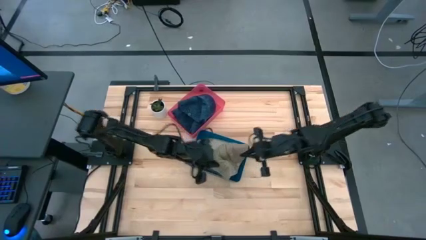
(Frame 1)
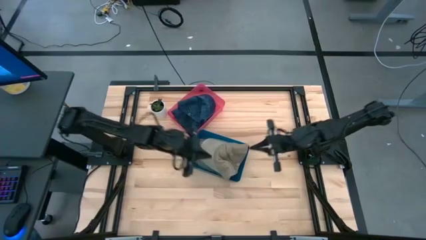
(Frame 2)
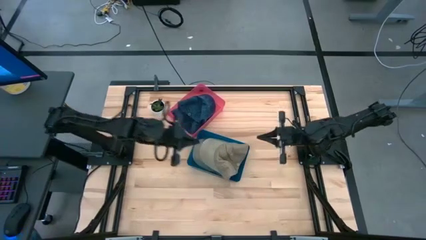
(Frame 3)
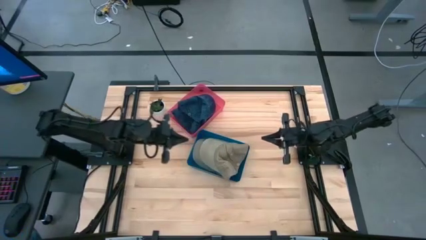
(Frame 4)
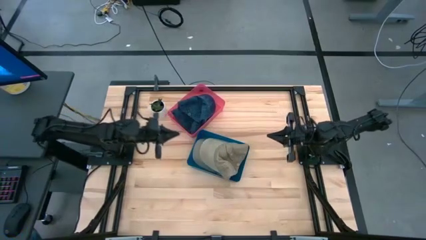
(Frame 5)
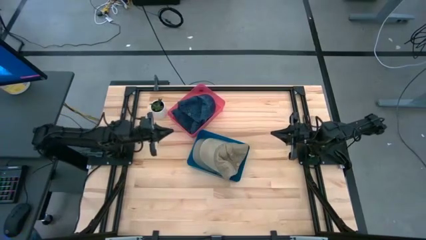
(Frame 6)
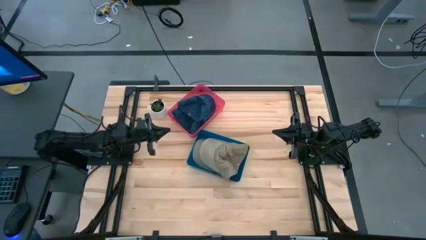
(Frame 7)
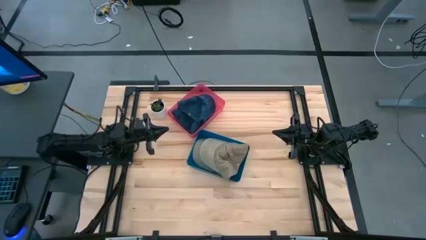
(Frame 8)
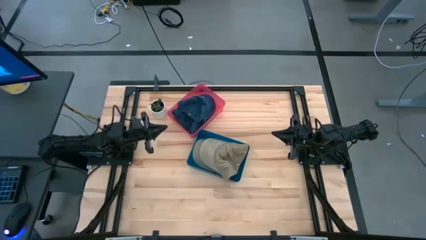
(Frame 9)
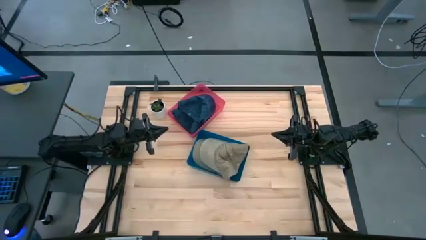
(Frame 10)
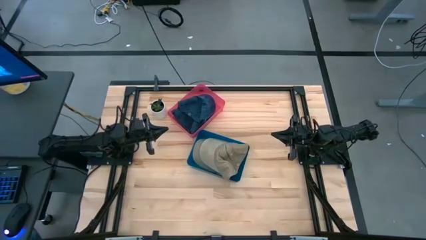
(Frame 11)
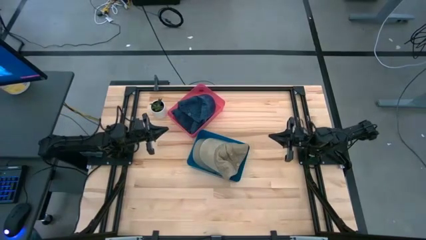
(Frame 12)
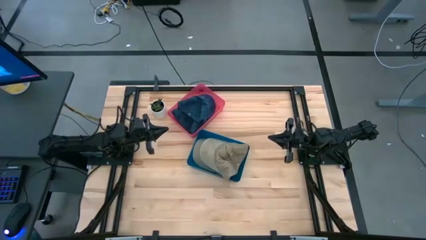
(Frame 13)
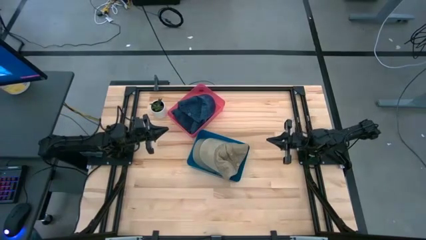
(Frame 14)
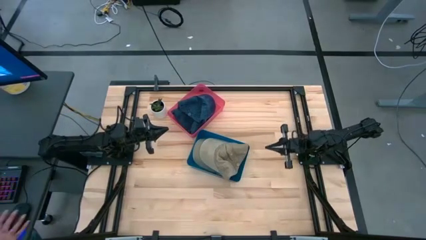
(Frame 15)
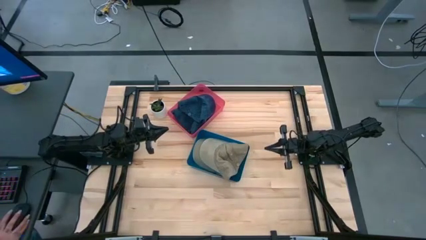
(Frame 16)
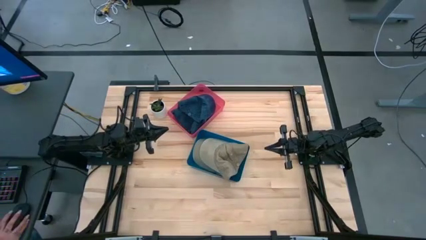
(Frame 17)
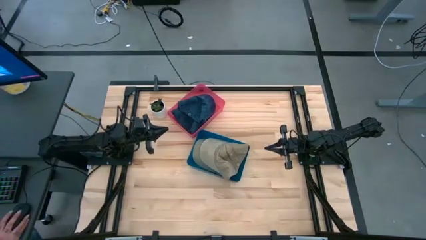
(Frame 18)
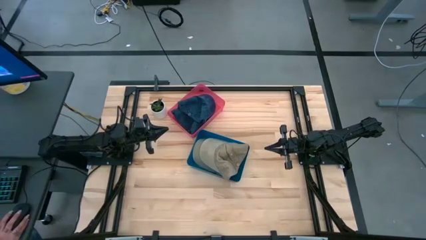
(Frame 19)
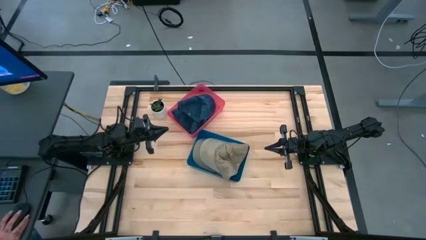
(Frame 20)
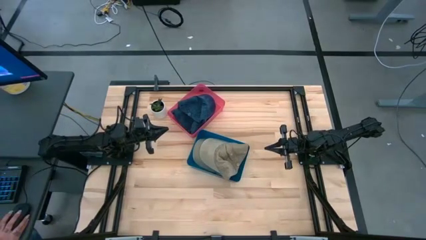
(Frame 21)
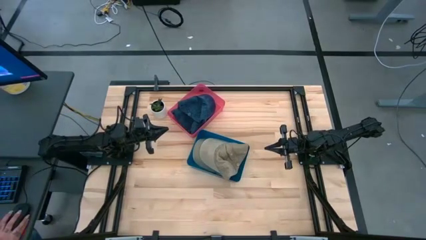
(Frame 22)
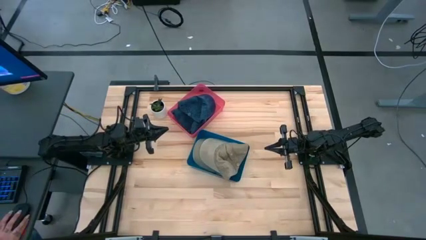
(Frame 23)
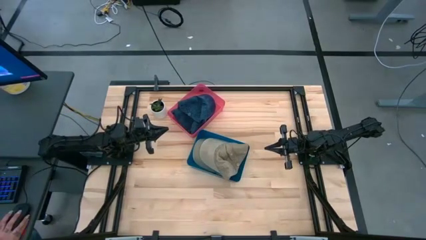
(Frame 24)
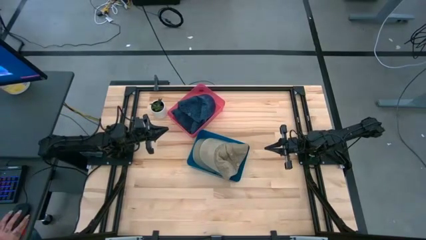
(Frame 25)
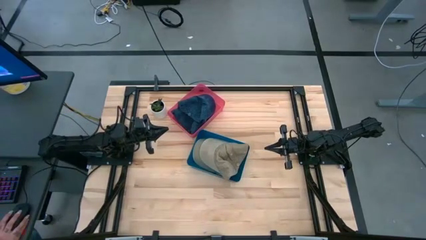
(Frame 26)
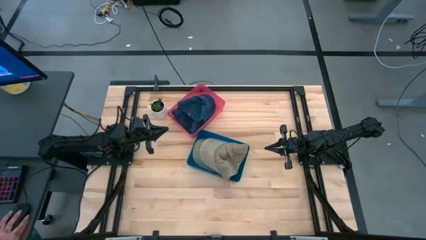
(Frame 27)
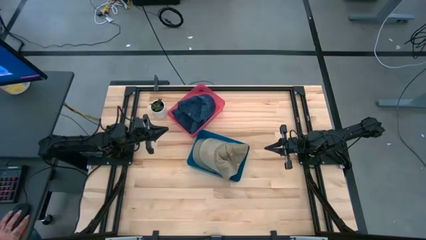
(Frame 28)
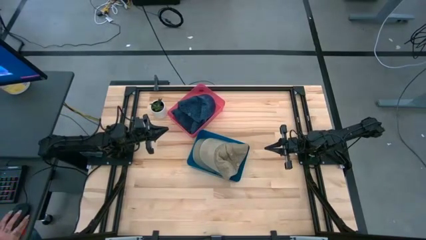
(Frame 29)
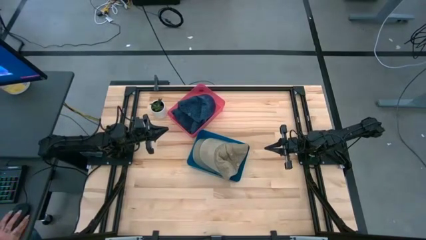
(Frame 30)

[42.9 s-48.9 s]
Task: Pick & Place hat
Return to Home Position

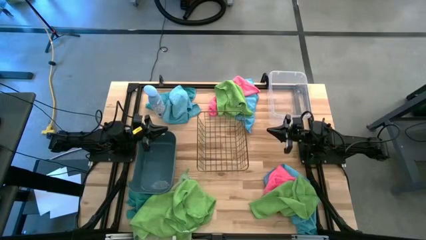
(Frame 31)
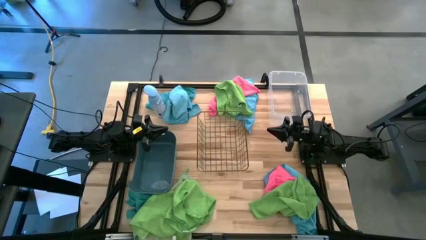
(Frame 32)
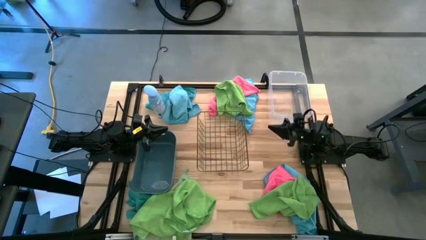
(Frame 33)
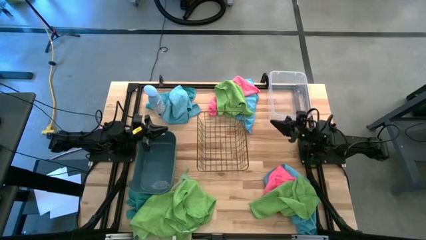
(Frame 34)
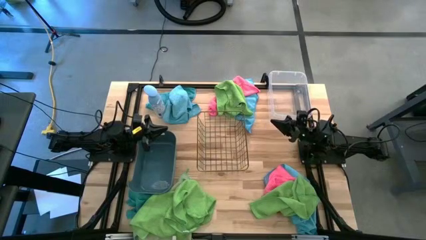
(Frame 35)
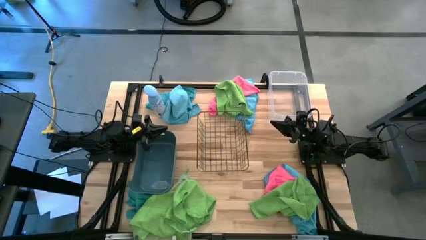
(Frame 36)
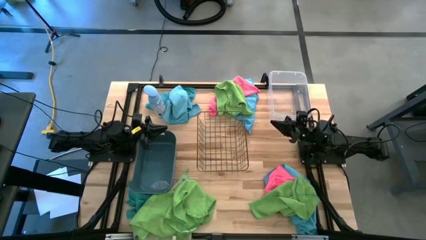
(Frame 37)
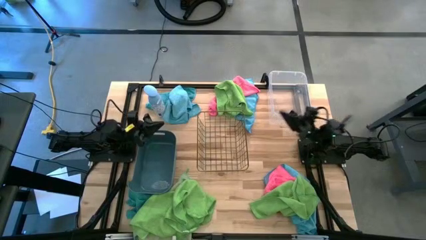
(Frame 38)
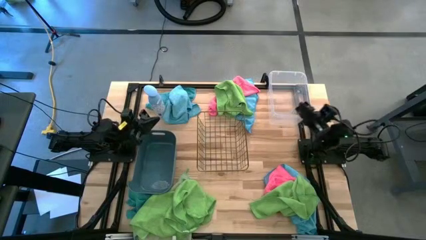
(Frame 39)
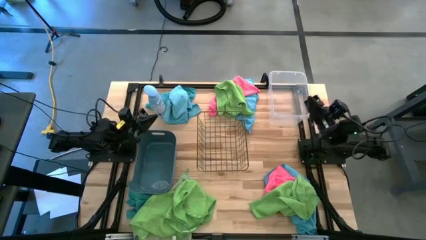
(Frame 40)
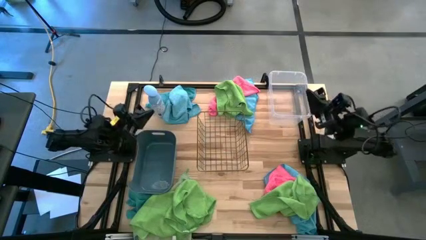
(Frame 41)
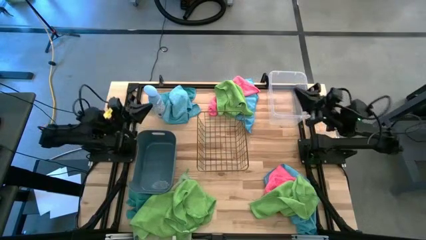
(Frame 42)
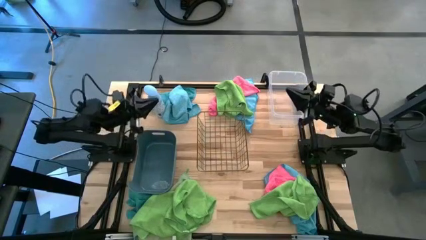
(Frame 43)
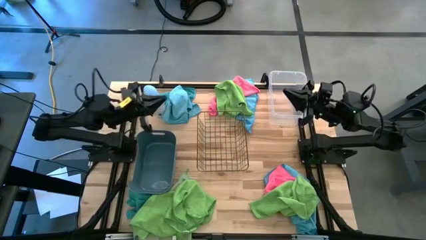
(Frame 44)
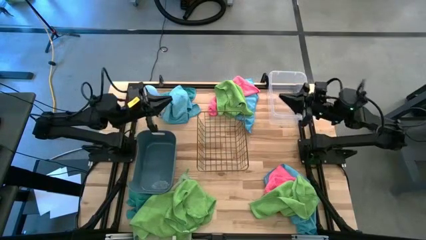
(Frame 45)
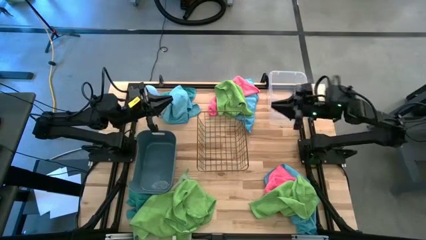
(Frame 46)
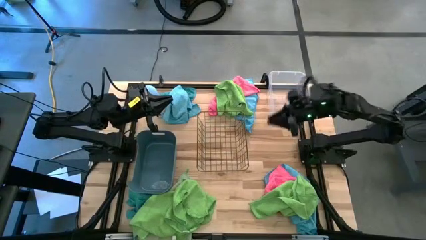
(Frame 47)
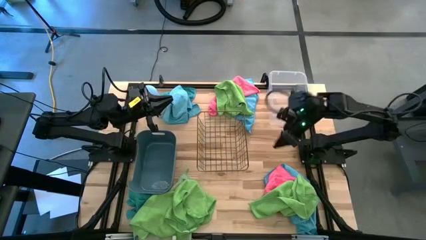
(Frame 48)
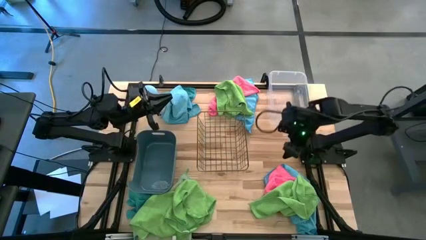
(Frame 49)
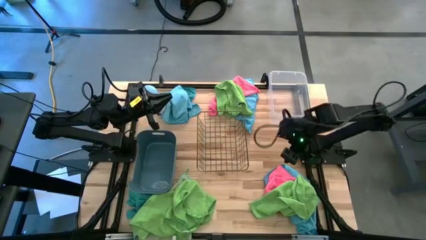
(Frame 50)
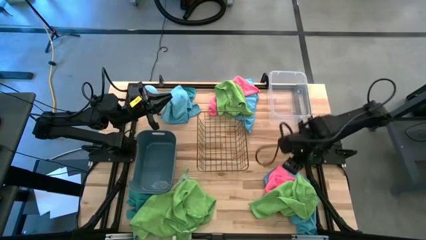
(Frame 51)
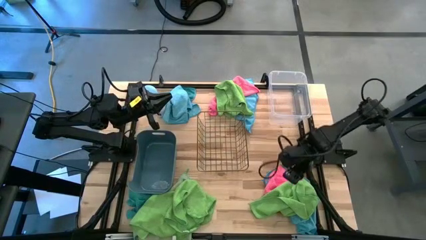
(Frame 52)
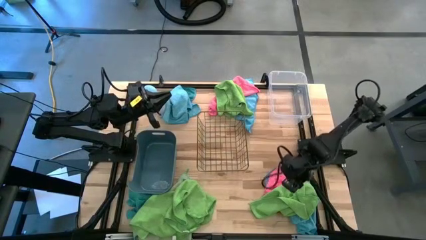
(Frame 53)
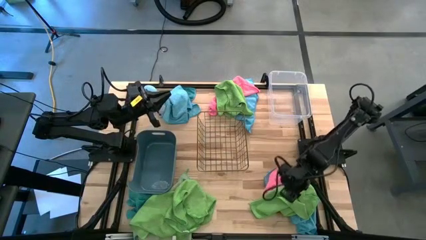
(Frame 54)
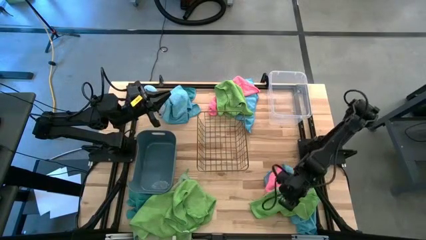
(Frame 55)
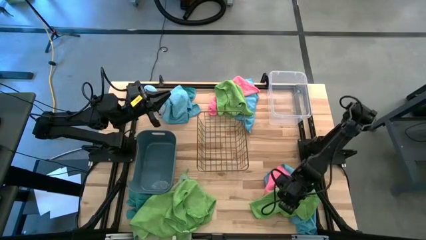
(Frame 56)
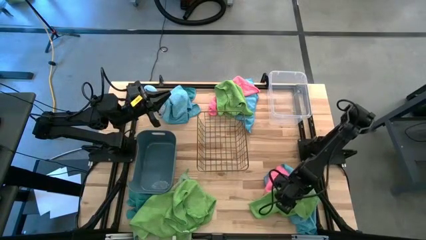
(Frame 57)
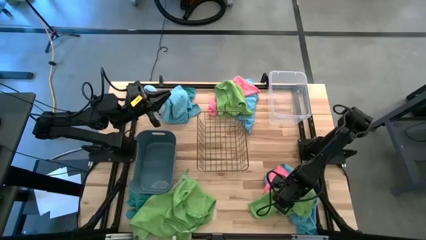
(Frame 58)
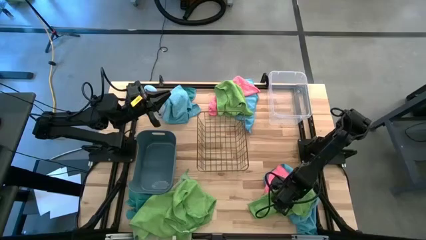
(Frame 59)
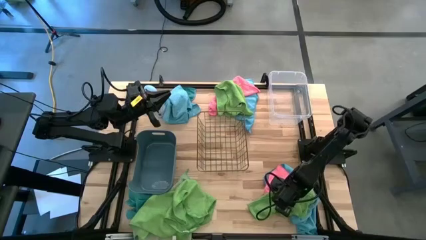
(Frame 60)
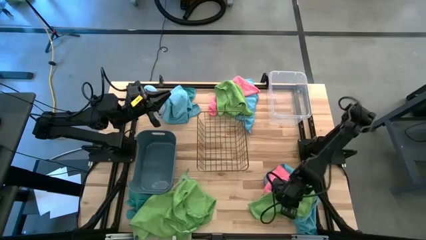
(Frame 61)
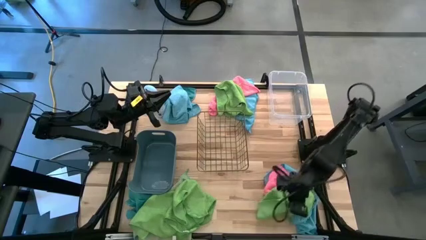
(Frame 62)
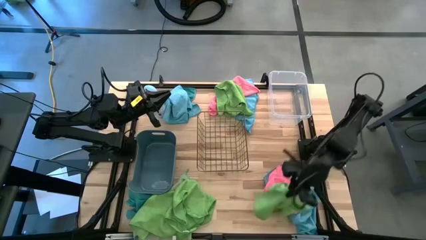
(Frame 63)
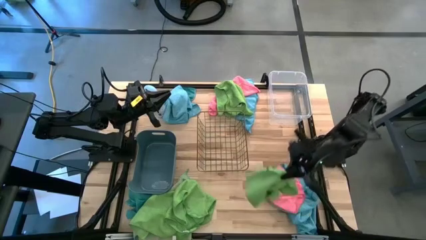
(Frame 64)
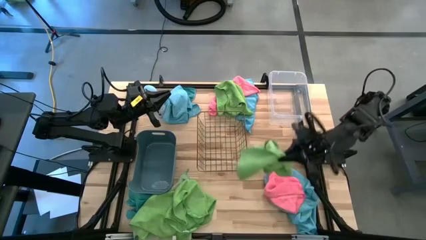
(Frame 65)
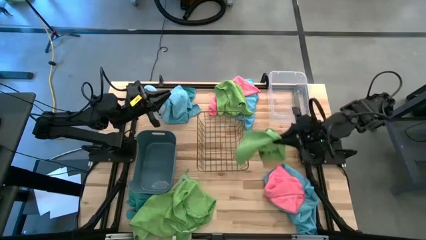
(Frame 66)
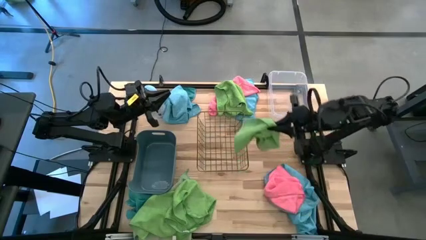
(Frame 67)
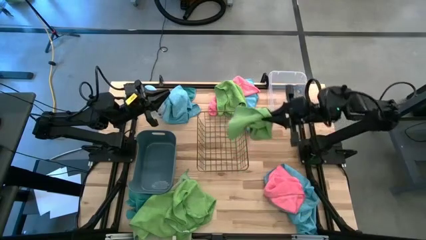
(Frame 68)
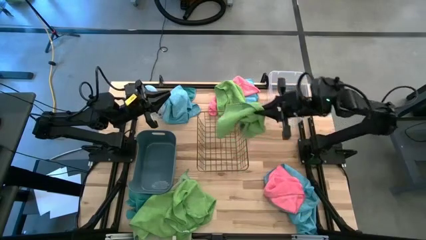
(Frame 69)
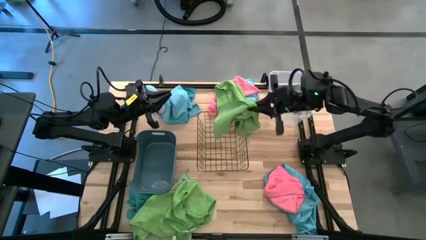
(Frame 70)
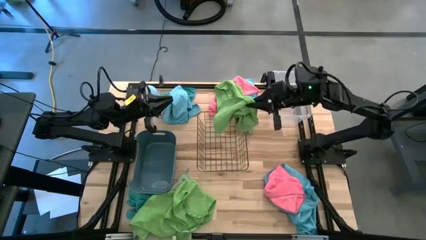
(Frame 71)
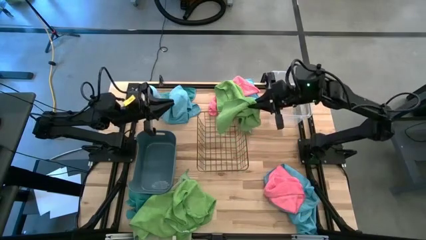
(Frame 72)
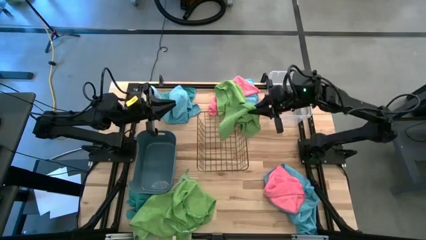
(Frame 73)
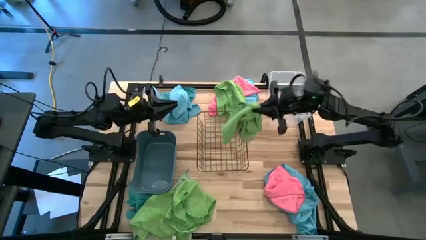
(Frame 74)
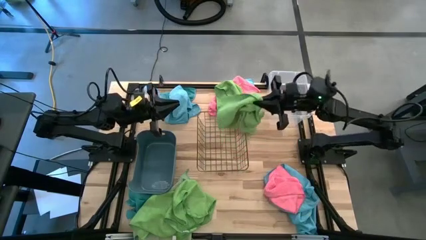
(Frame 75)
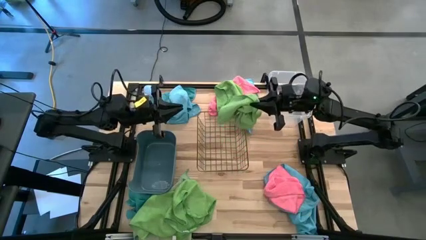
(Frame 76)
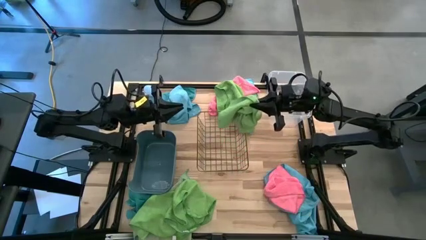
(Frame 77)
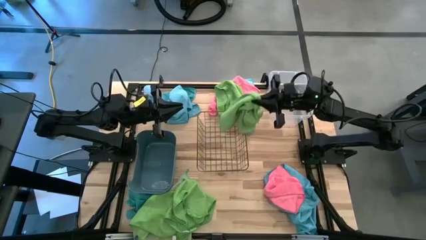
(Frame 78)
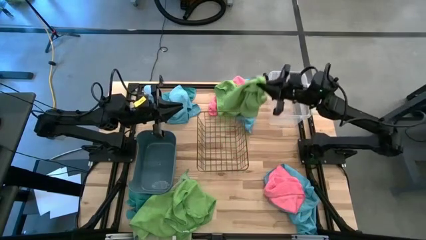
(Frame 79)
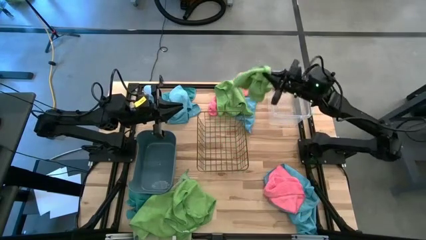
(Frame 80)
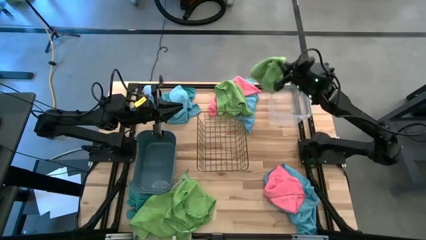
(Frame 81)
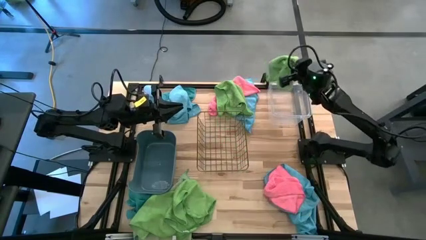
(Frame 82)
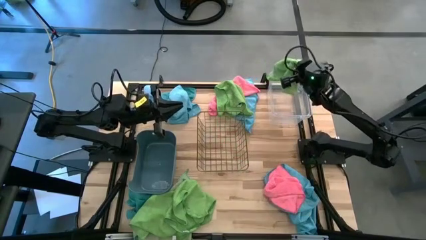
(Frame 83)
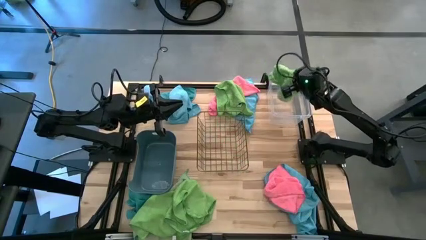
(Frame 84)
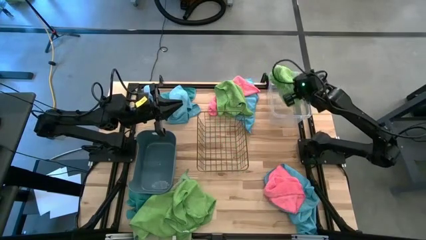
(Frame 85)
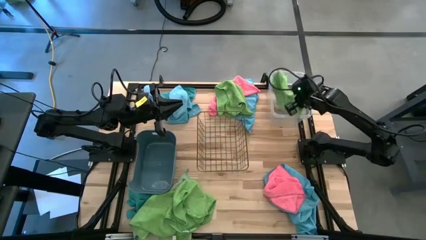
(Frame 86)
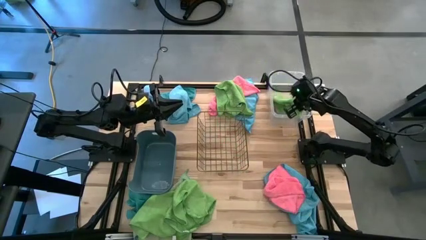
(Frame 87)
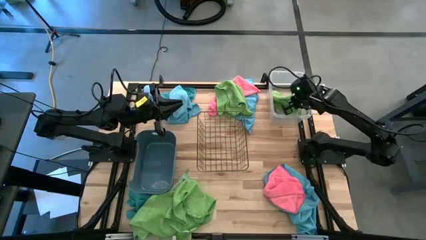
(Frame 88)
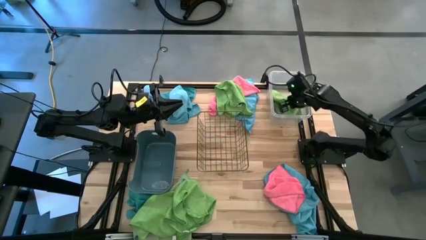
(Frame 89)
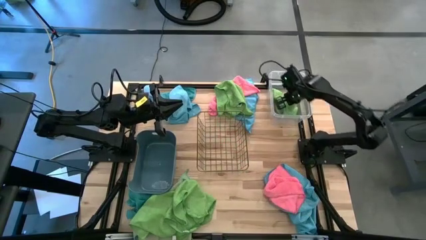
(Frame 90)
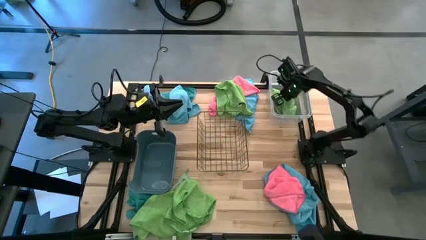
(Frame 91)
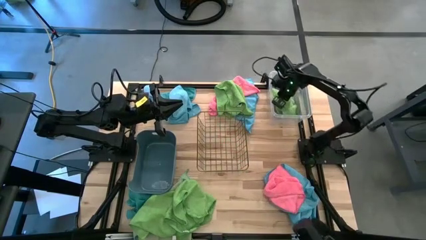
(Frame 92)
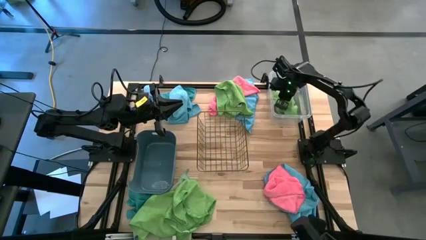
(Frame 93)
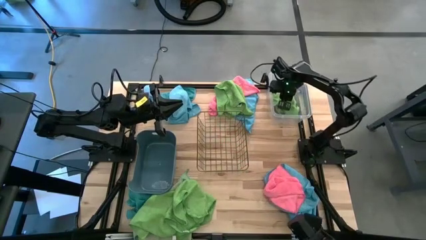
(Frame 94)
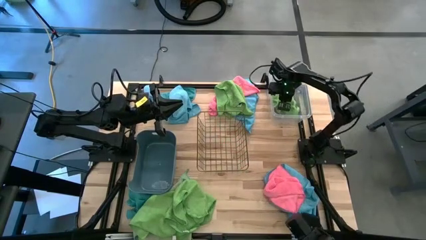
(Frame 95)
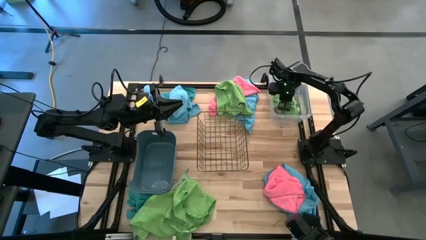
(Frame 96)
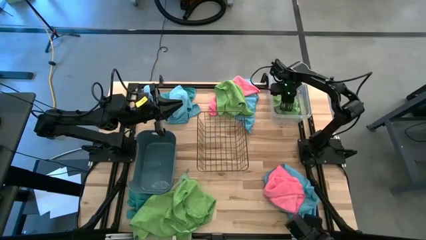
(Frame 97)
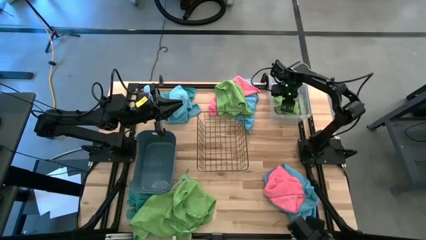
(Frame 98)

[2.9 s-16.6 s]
Task: Sort microfiber towel by color & place in baskets
Put the bottom right green towel into the transparent bin
